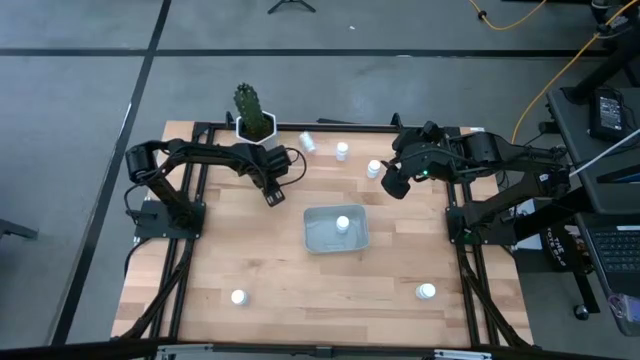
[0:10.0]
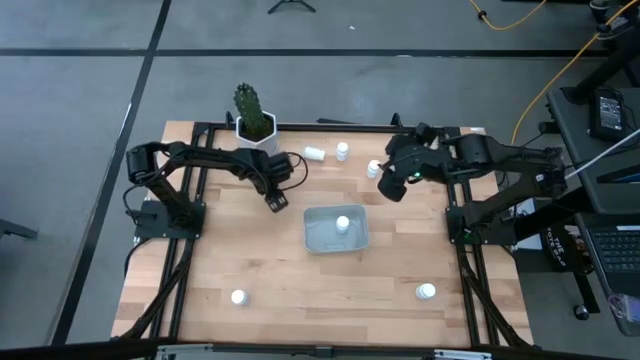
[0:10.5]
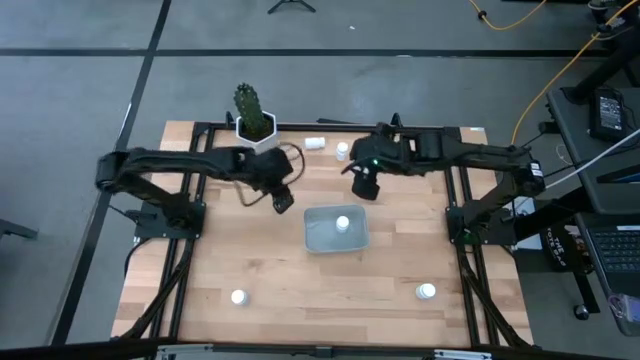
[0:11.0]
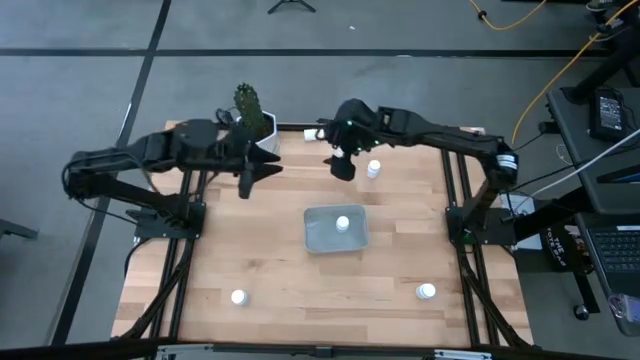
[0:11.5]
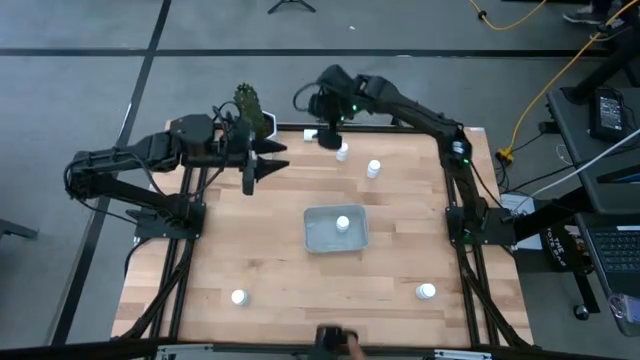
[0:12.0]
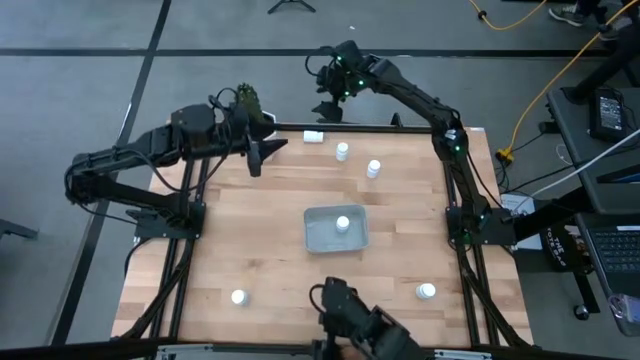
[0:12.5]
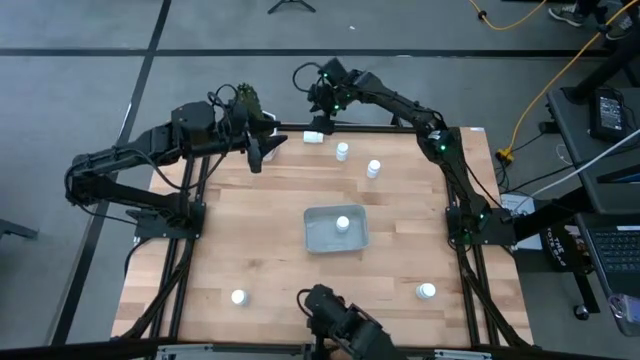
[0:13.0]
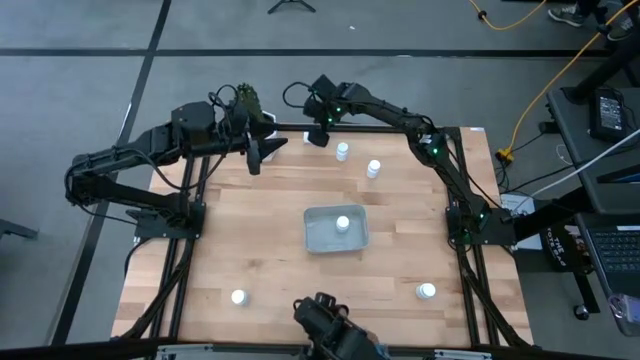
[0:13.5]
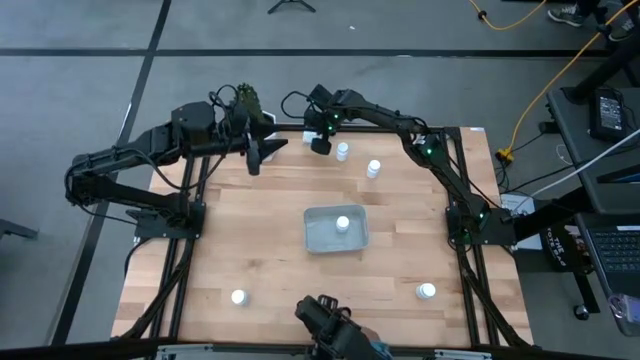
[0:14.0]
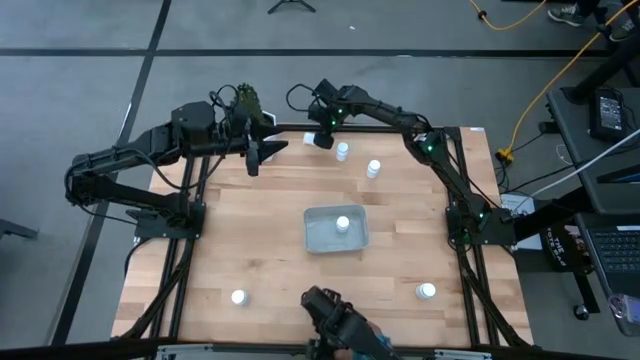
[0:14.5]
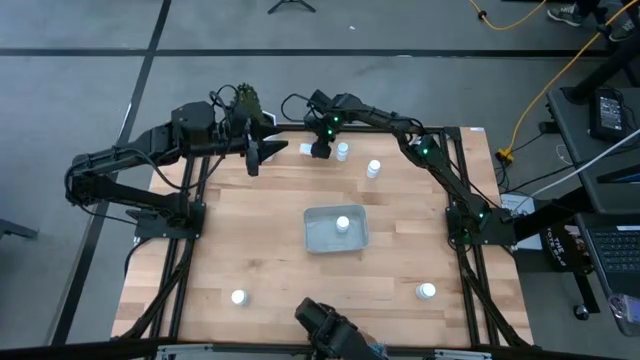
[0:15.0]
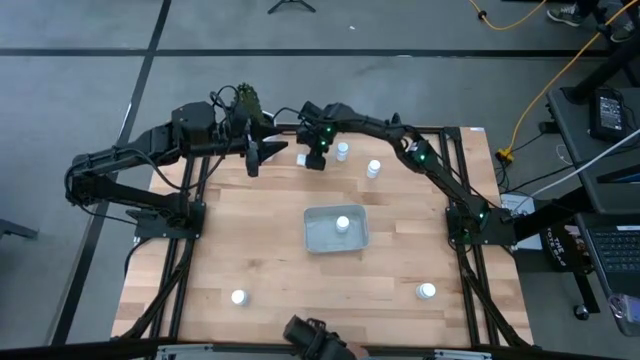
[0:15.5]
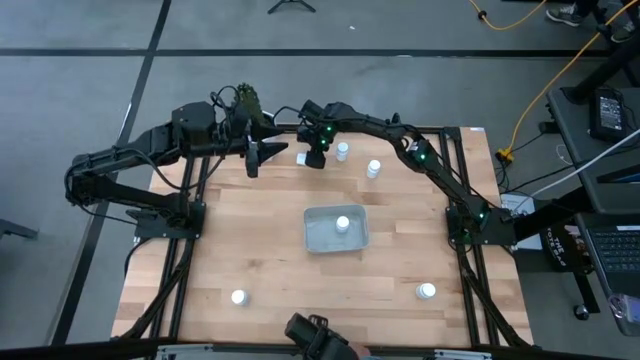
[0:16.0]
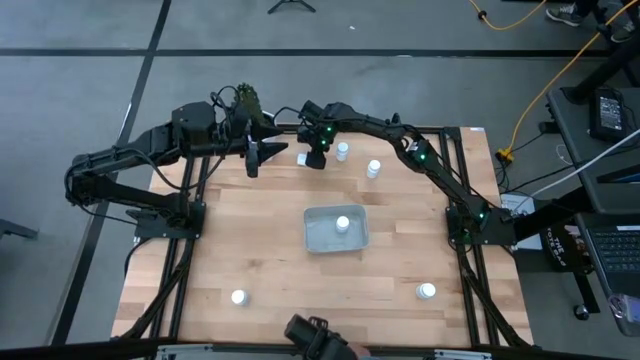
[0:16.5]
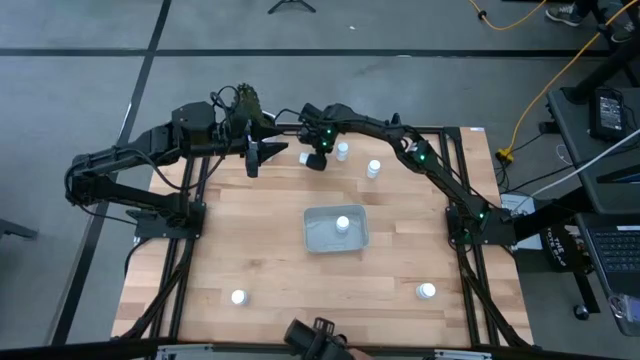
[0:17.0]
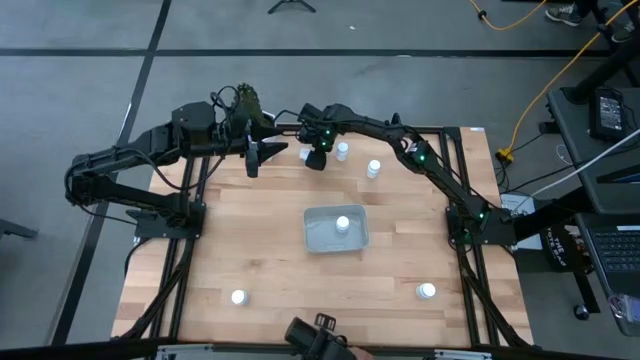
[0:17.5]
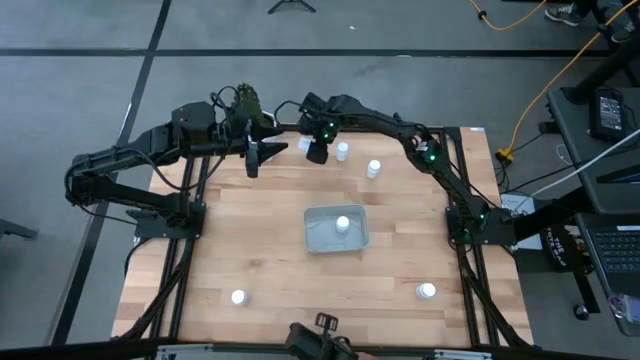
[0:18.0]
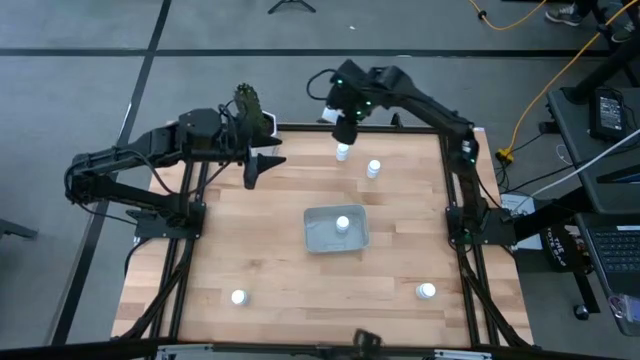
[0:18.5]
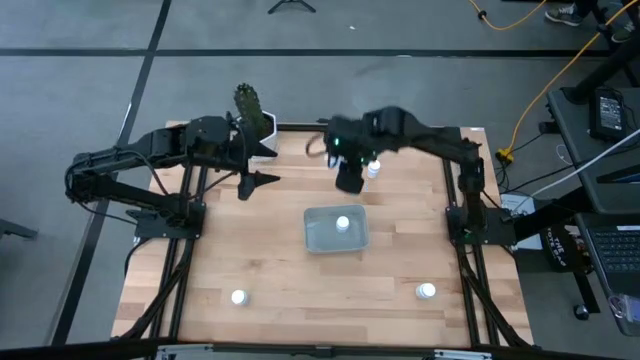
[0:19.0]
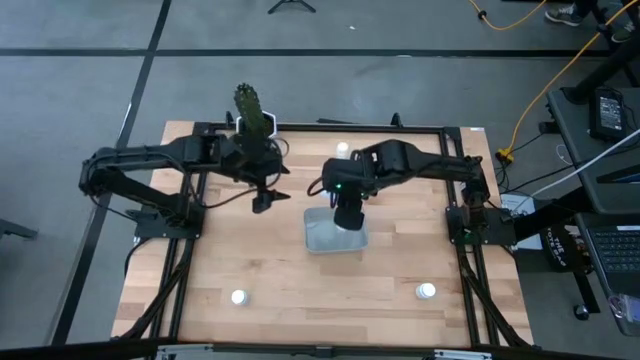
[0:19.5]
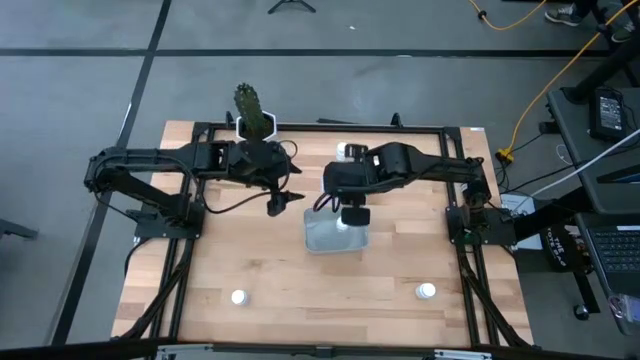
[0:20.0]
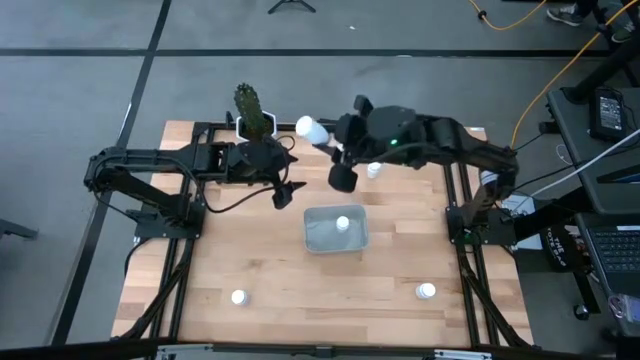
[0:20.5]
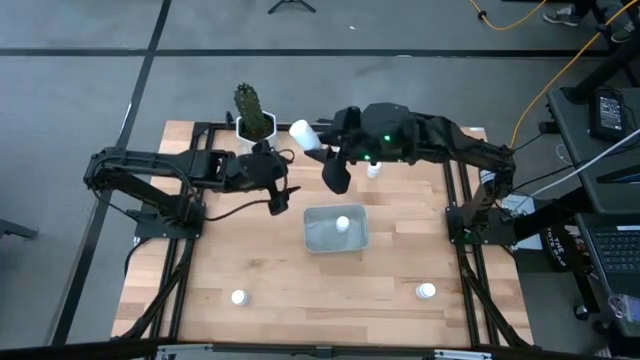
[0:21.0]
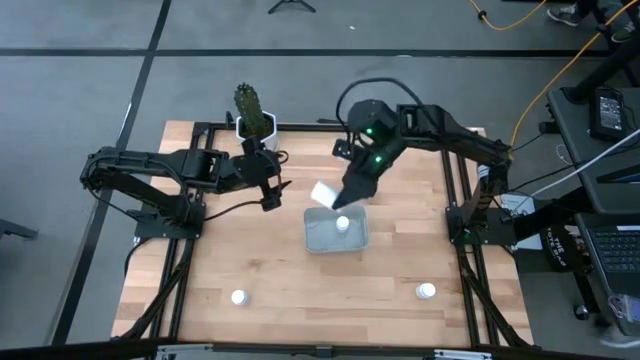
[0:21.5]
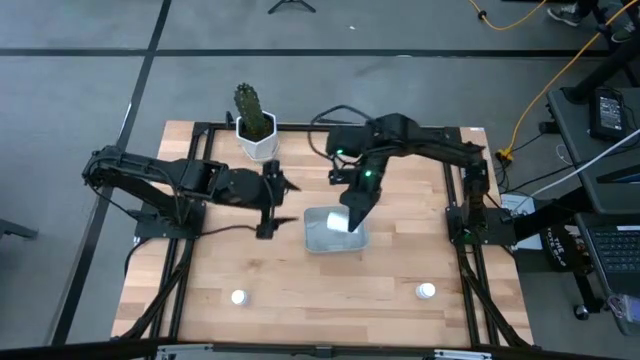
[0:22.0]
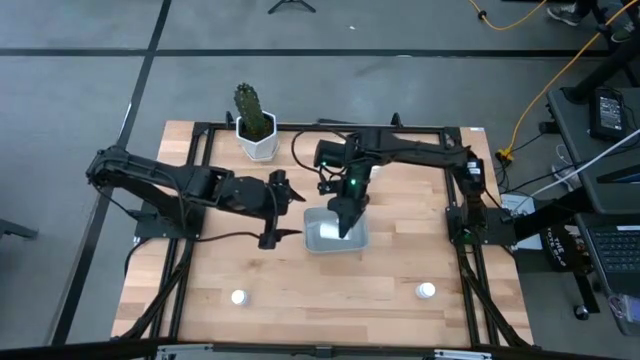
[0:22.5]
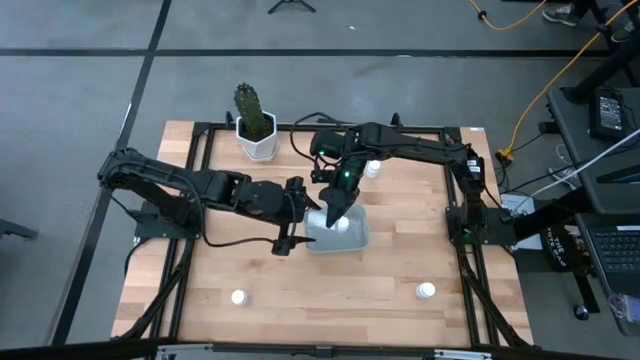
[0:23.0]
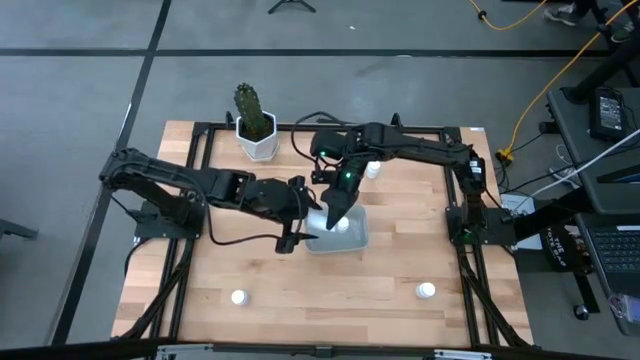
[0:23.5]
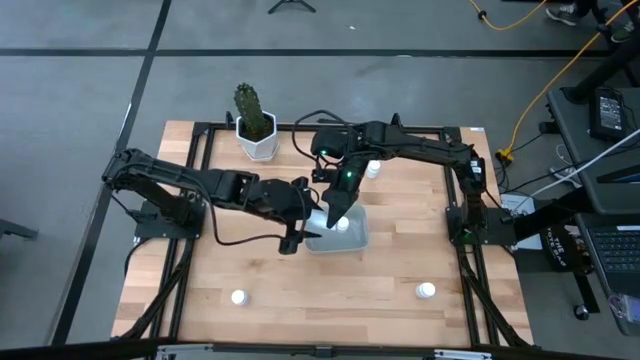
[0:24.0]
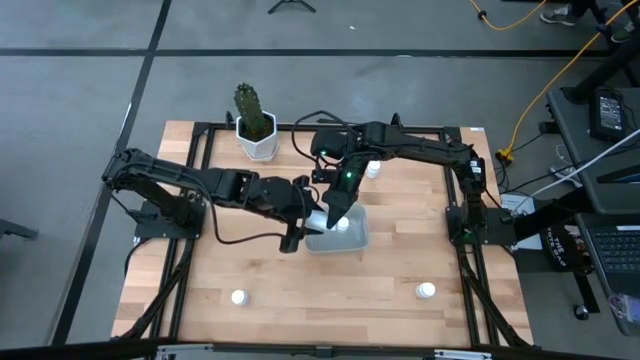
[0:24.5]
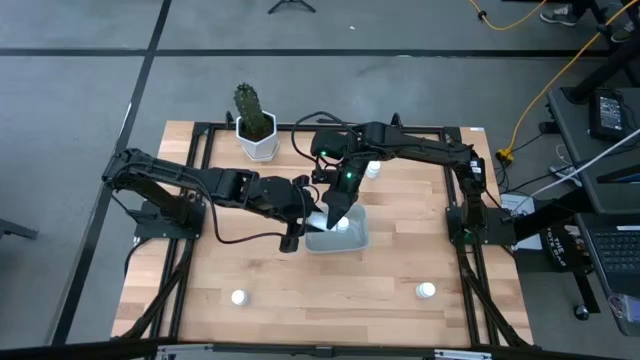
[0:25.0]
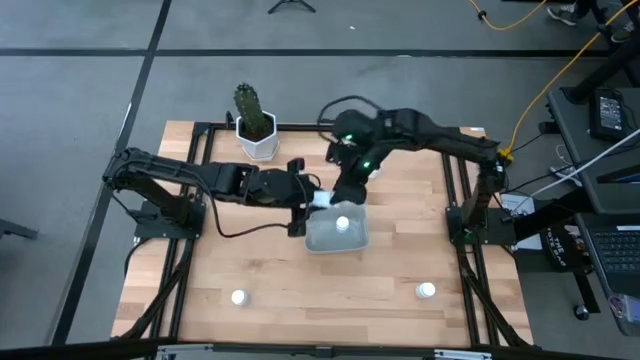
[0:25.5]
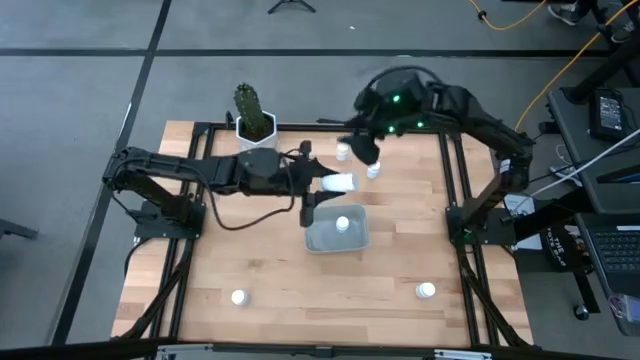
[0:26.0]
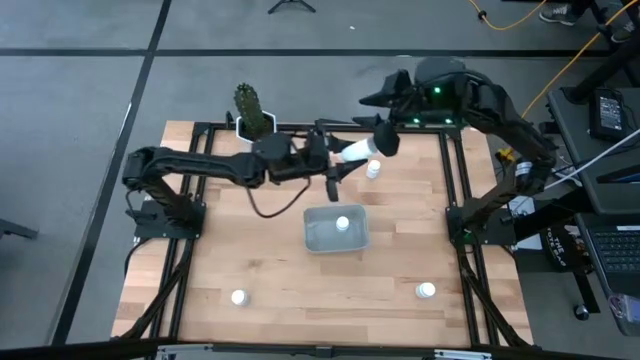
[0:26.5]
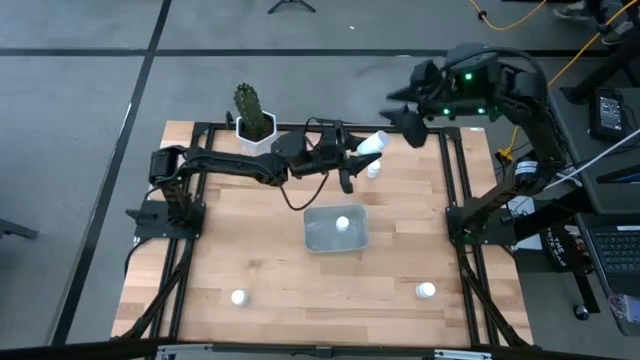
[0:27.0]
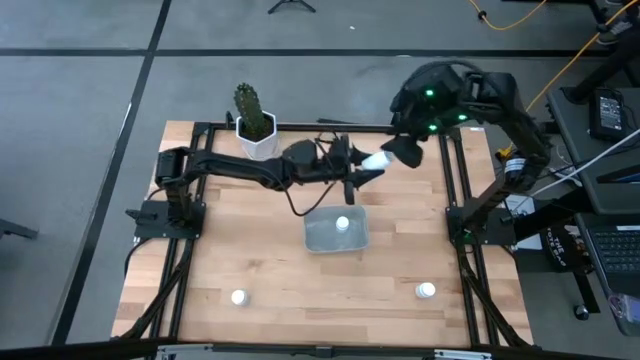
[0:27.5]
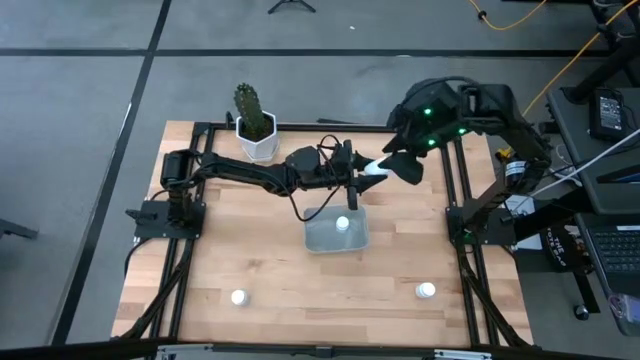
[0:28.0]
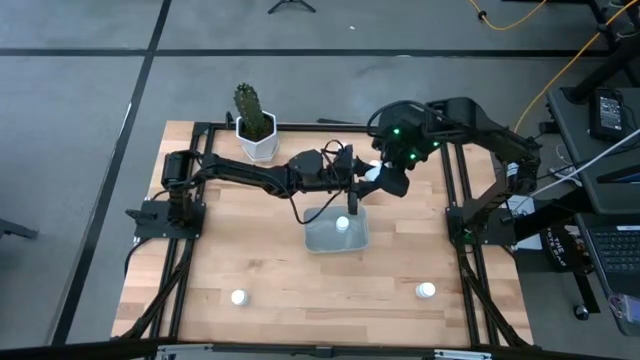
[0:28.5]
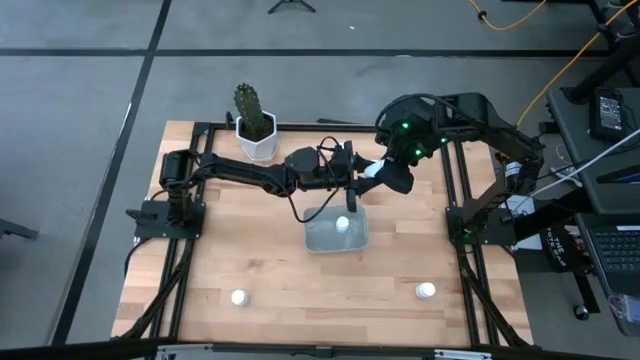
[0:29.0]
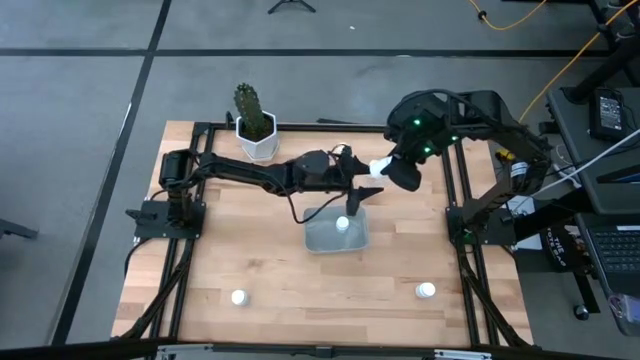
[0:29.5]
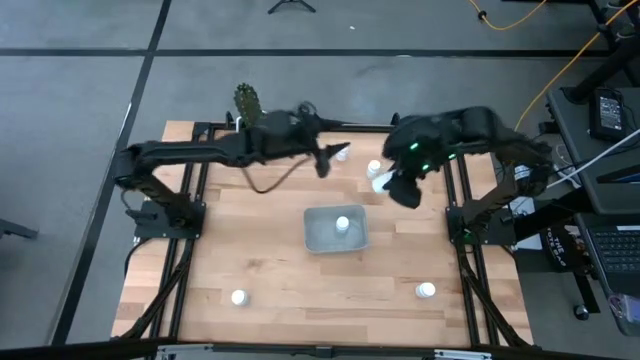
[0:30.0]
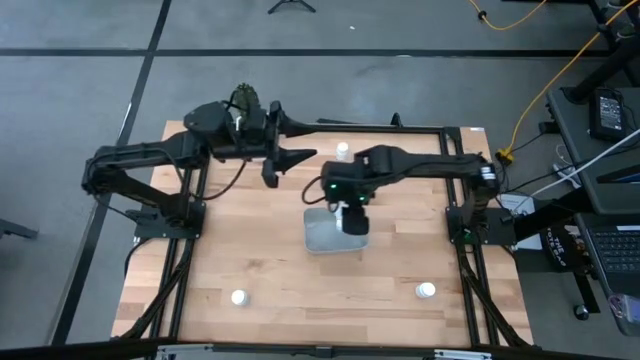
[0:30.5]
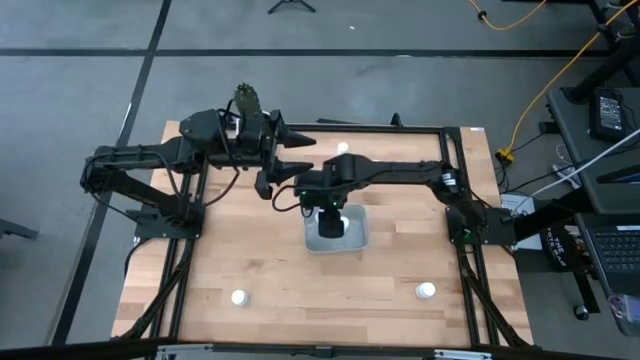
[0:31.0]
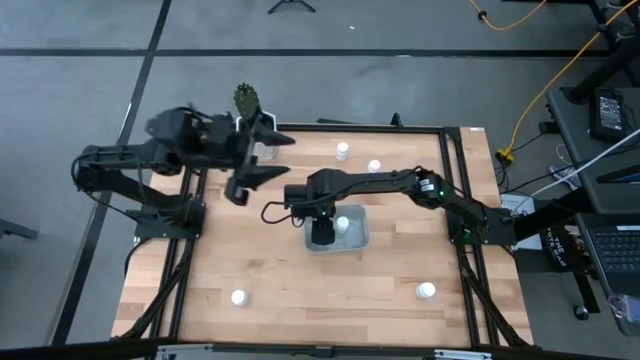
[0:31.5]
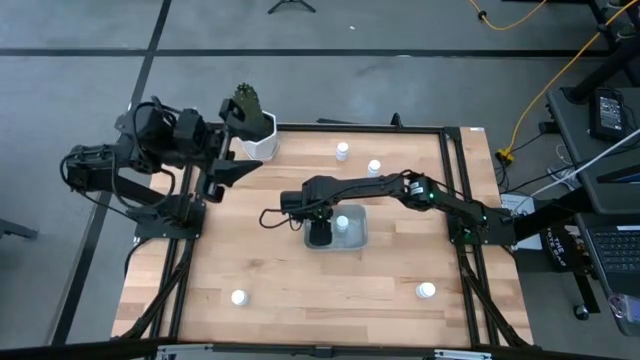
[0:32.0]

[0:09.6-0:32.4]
Task: Pick and place pill bottles into a basket
Put the white pill bottle into the gray bin
